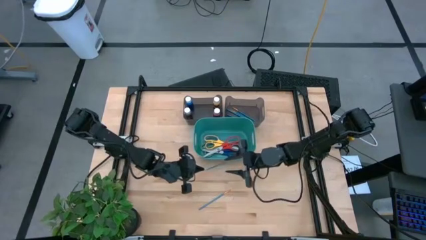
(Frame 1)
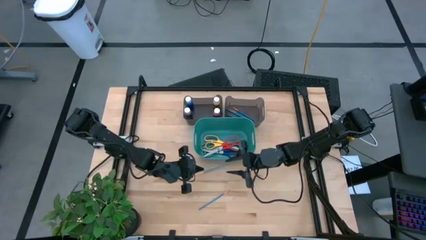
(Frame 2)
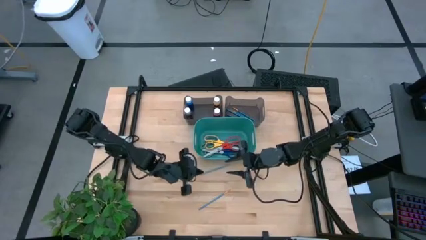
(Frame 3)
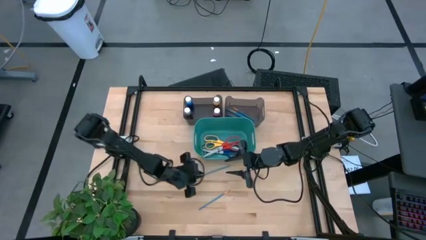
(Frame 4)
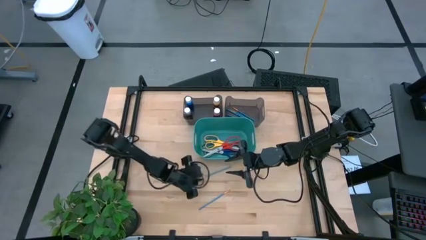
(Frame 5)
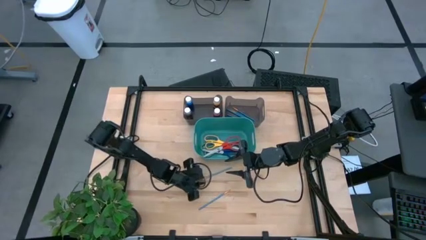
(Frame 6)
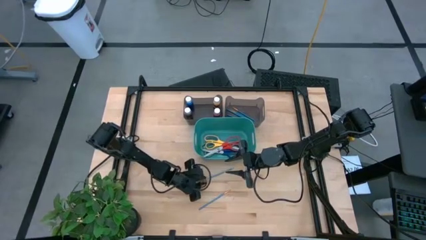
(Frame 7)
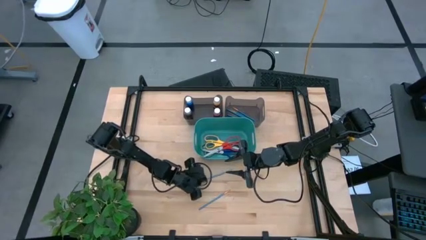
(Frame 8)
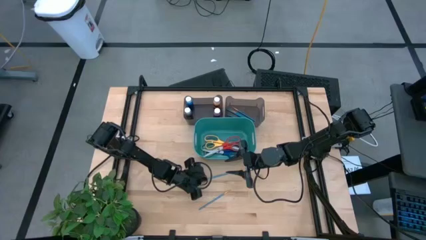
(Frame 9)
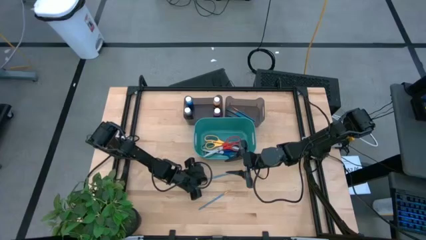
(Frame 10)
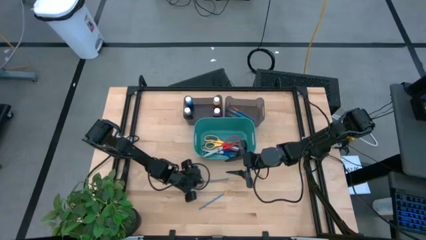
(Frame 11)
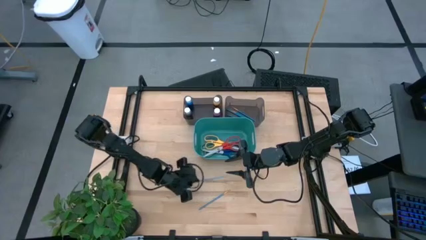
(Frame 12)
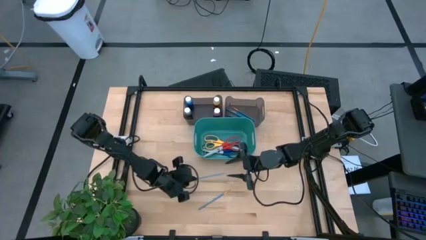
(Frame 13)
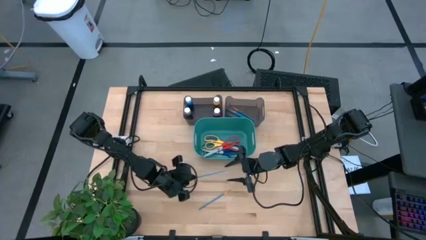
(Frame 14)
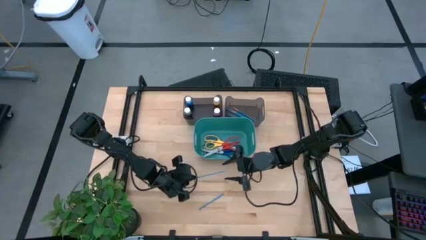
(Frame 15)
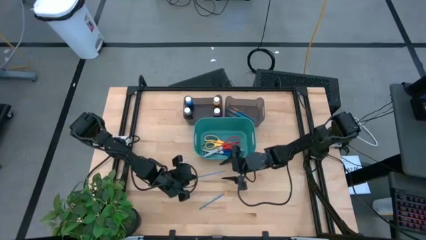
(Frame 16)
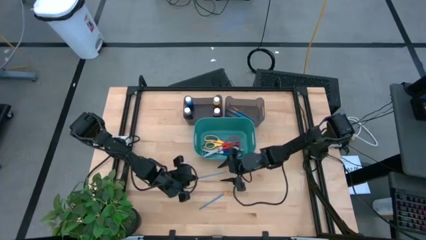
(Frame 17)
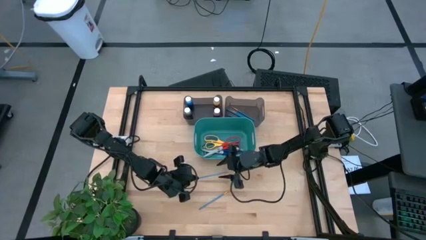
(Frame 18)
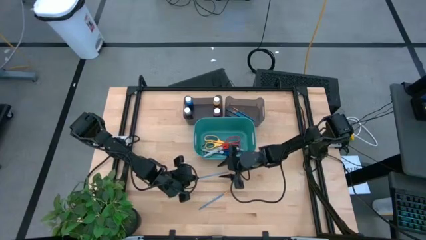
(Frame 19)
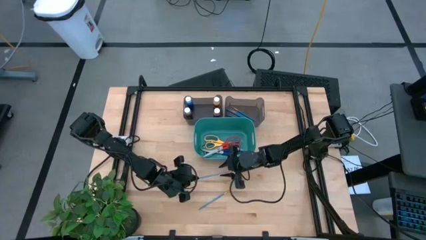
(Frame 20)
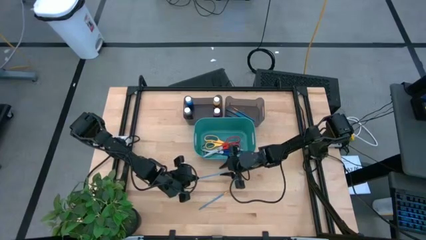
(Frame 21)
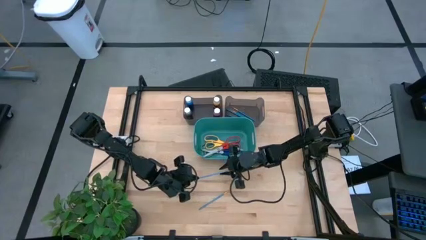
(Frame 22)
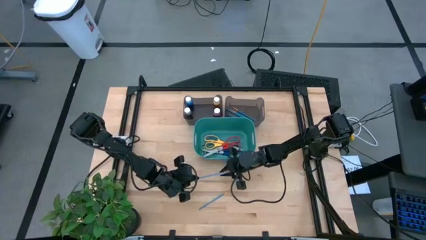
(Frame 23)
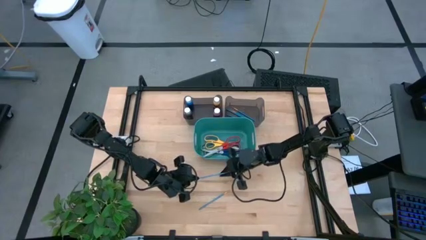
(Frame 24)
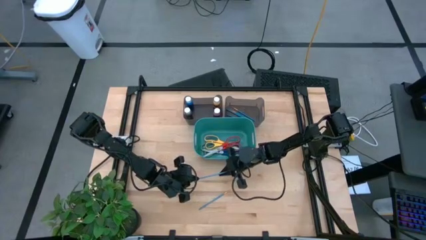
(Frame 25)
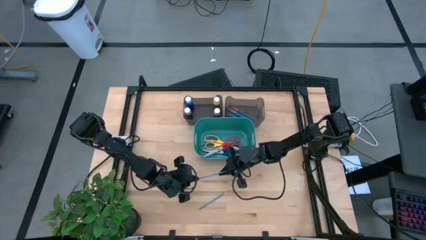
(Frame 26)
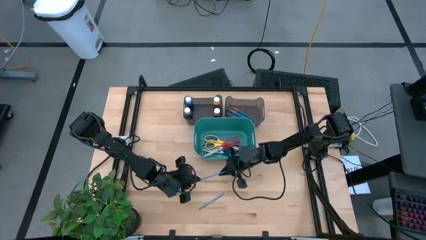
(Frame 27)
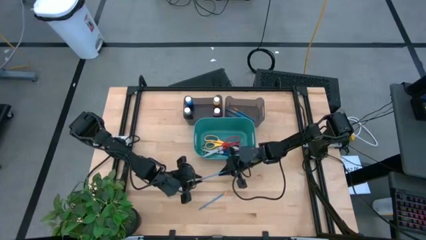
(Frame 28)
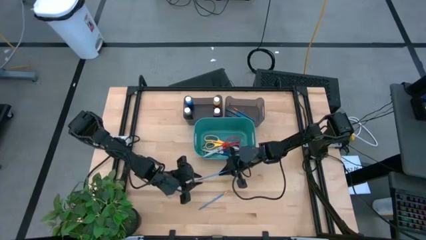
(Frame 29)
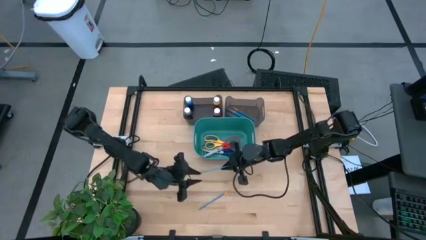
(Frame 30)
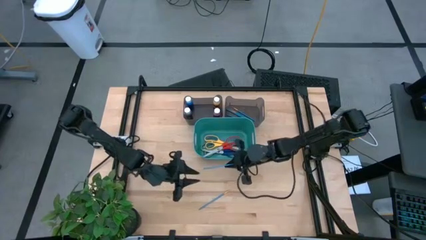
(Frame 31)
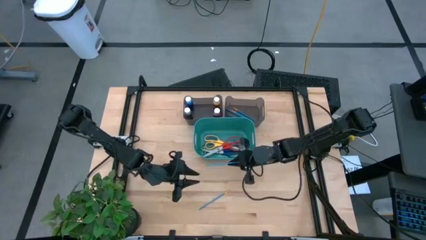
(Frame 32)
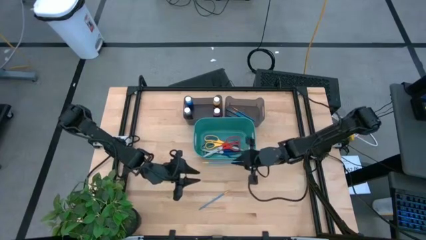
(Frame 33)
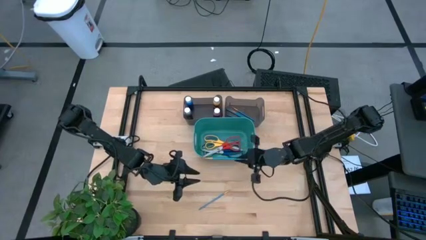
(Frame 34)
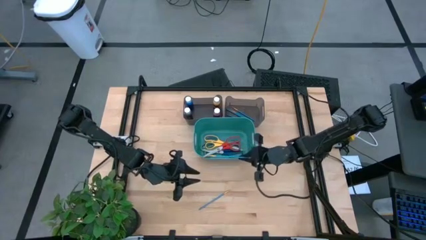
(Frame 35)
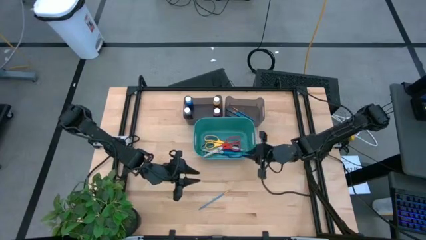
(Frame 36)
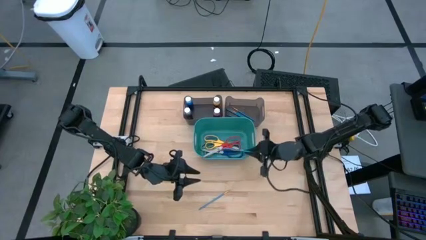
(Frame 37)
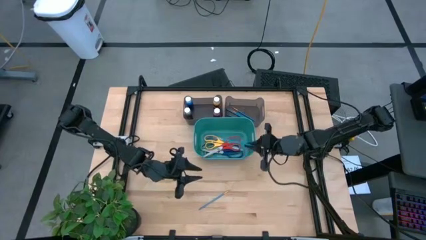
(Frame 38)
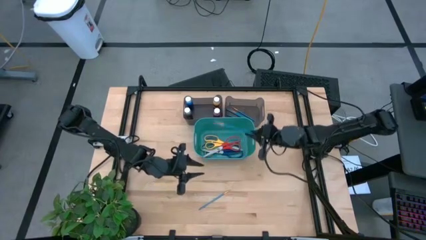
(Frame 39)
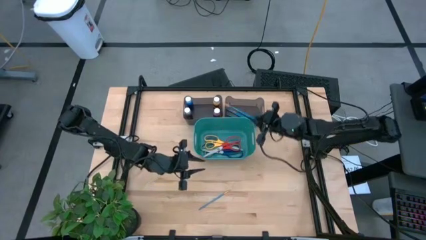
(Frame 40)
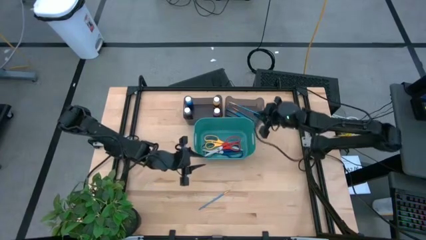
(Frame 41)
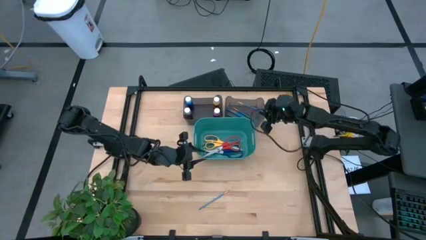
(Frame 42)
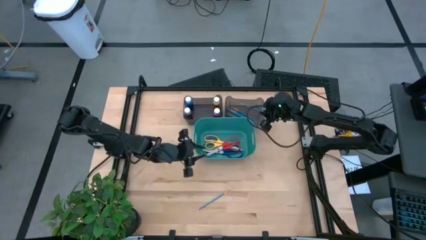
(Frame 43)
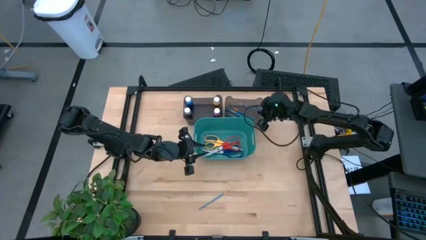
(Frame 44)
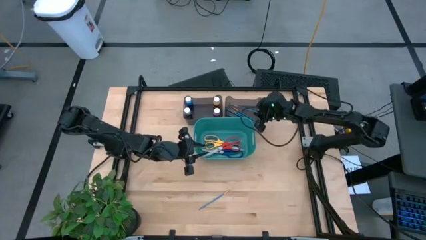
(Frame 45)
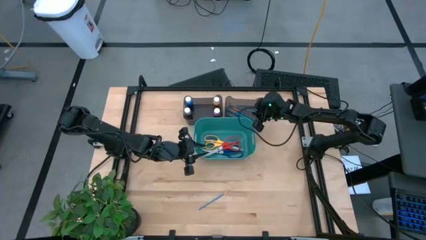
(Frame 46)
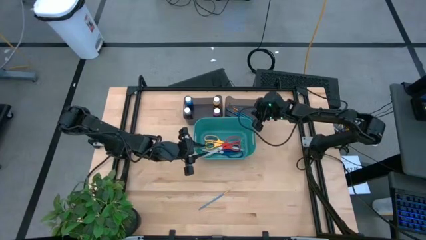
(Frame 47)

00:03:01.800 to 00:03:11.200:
Task: Pick & Place Paint Supplies
Put the blue paint brush into the right black bin

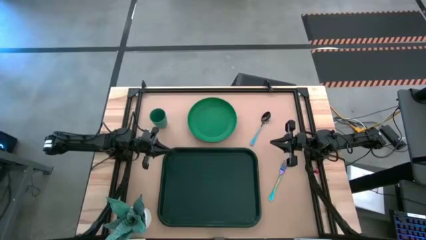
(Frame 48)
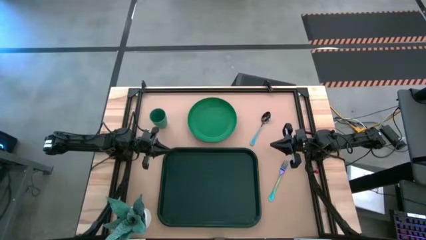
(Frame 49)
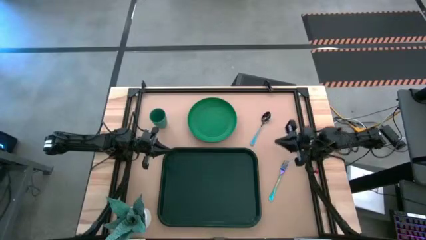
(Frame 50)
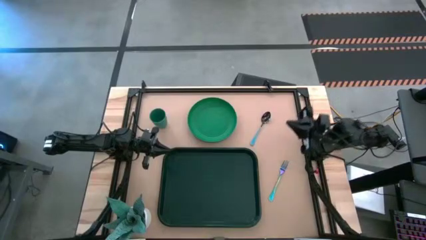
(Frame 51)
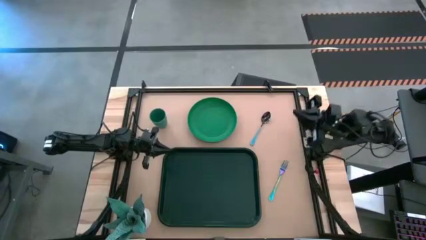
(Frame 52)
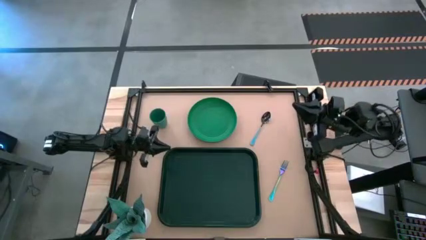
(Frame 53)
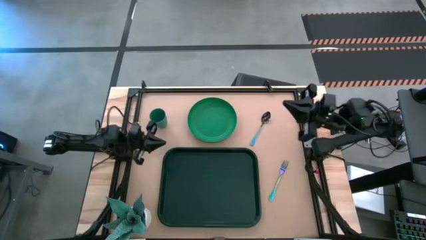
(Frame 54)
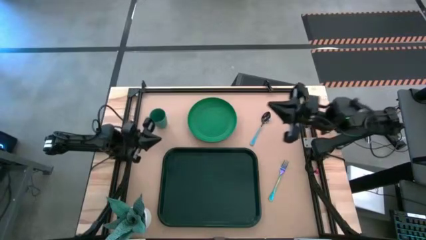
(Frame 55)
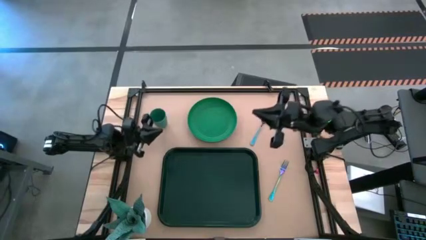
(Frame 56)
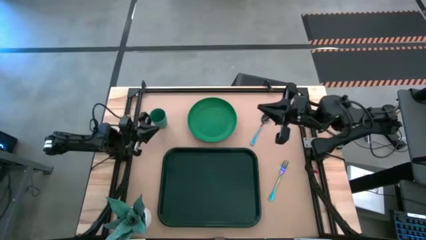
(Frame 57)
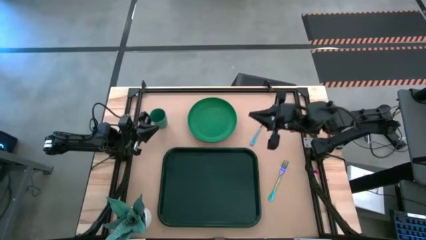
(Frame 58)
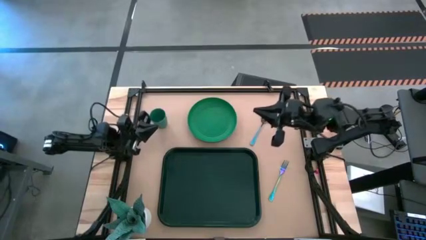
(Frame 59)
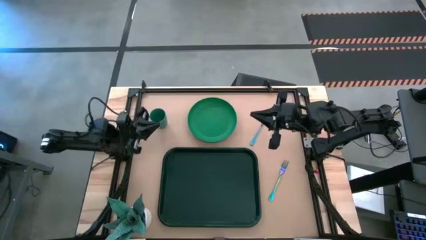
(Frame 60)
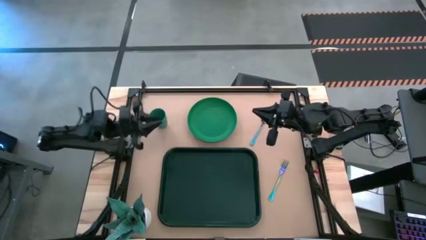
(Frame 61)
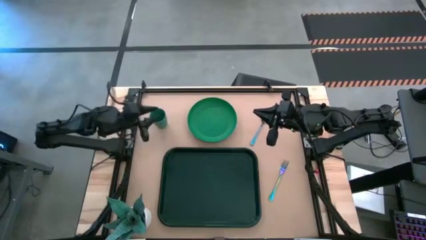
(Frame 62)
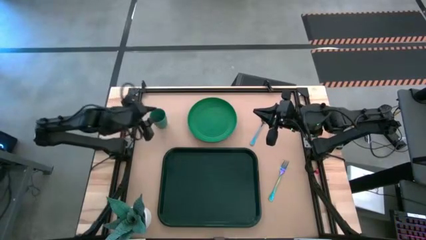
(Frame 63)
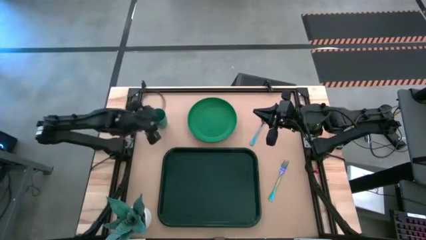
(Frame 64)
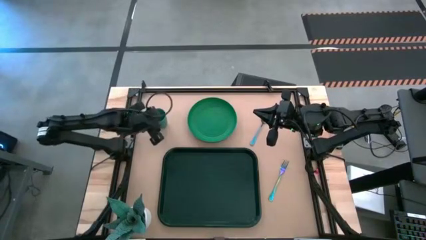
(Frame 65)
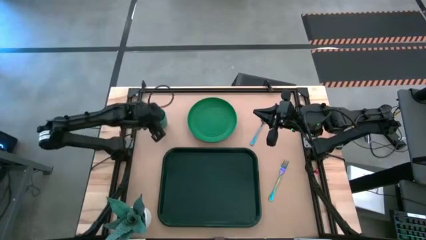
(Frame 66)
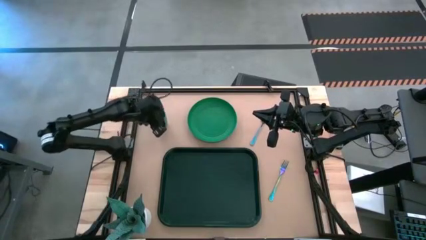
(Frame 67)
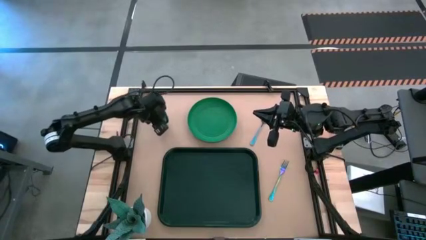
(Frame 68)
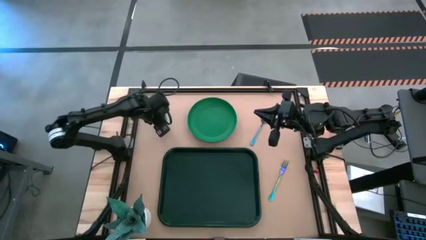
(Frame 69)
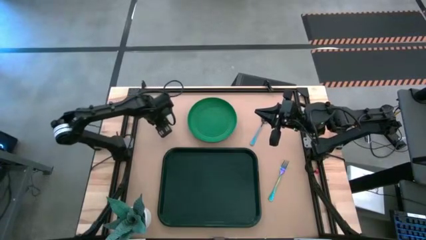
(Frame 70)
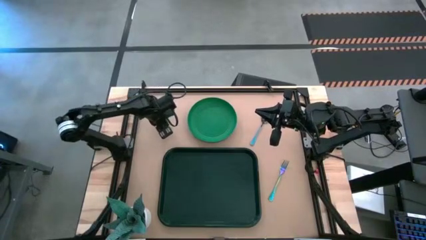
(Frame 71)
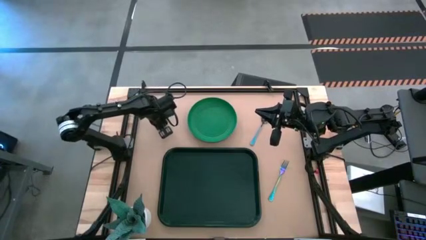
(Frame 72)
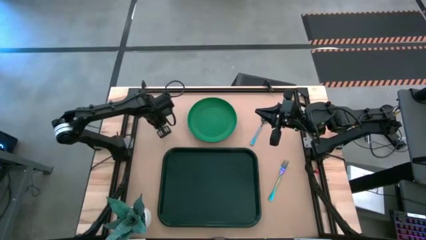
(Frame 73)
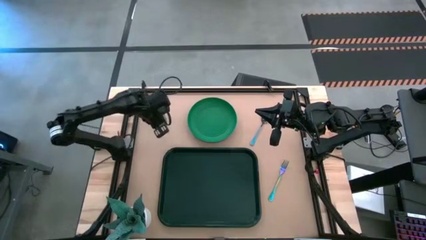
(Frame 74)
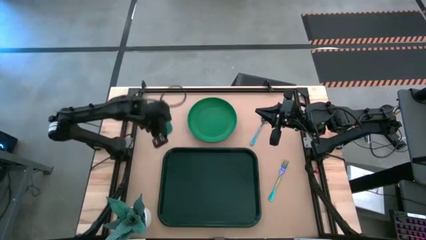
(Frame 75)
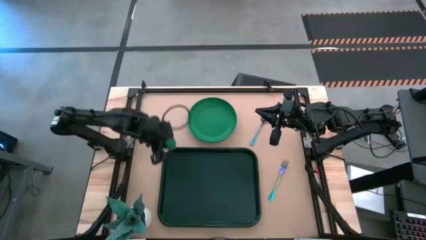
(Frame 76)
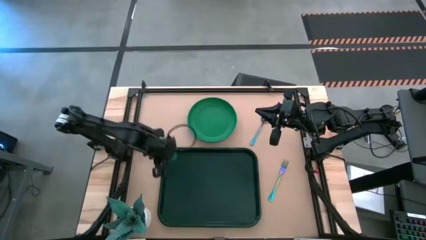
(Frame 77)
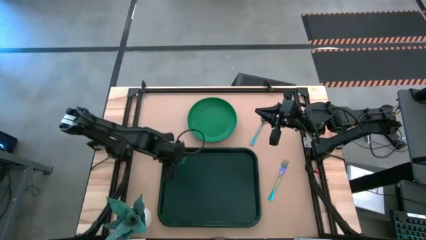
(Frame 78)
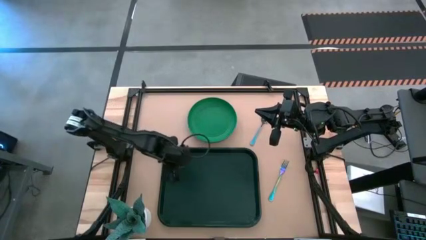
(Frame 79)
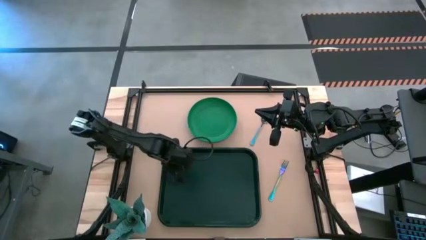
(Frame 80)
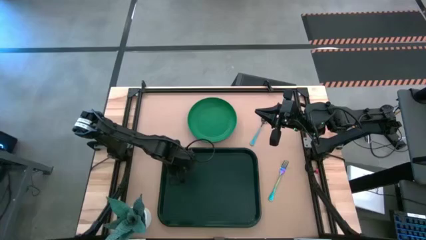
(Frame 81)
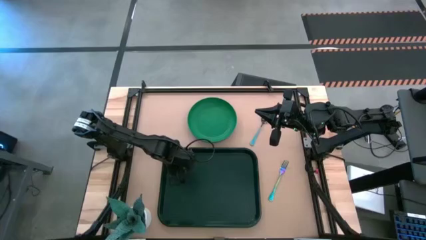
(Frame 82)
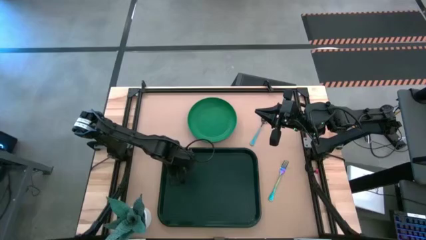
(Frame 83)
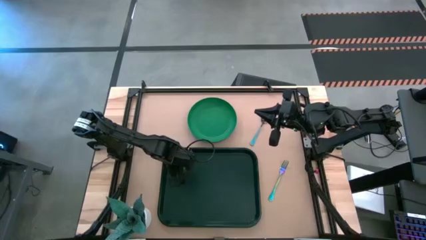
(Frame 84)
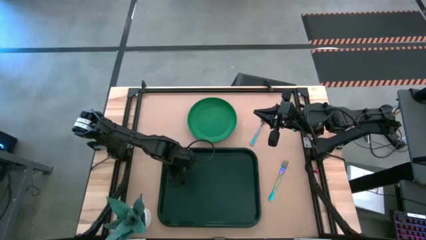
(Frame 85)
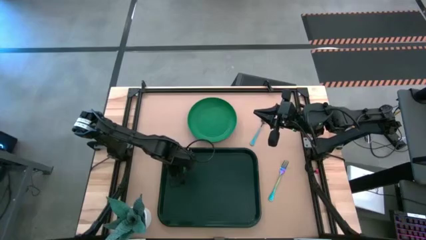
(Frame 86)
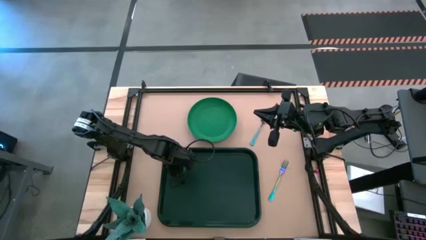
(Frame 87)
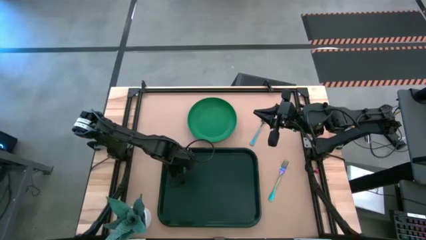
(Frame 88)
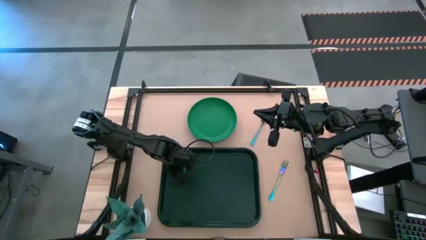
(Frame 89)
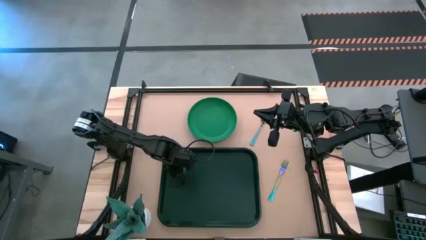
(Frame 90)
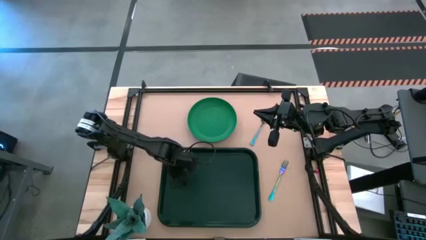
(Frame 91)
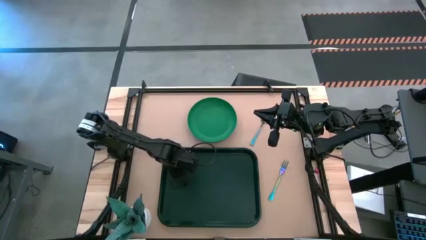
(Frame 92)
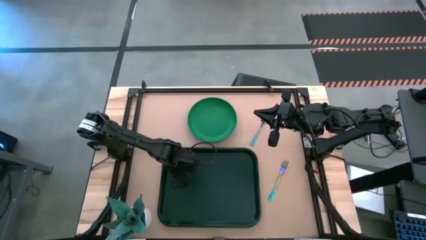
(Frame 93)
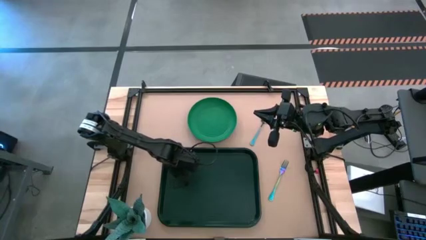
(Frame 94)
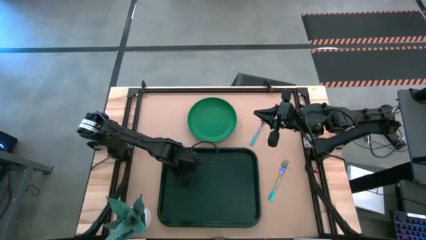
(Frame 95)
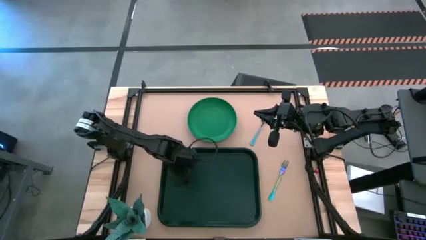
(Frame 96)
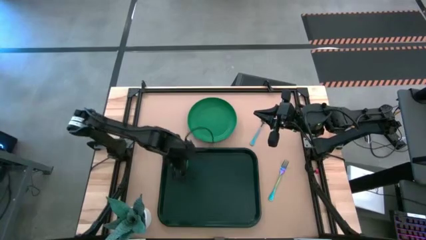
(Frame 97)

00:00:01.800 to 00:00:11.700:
Task: Pick and place plate/cup/fork/spoon on tray
Put the green cup on the dark green tray
